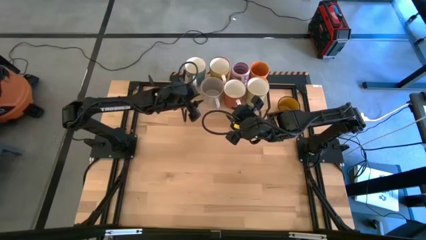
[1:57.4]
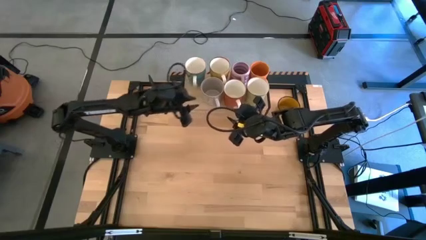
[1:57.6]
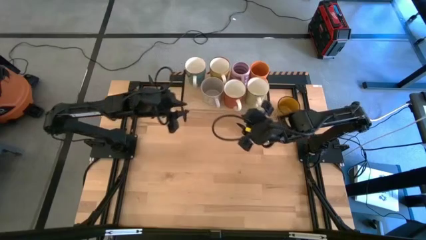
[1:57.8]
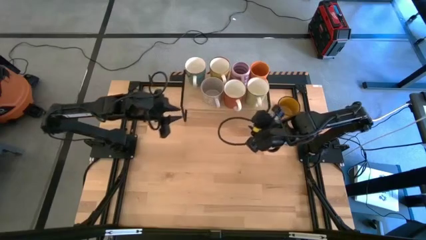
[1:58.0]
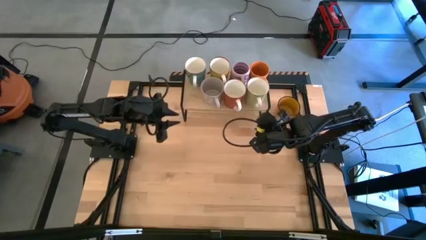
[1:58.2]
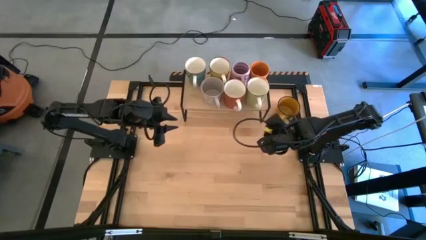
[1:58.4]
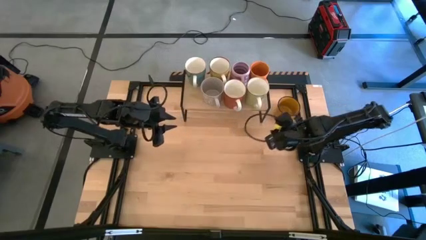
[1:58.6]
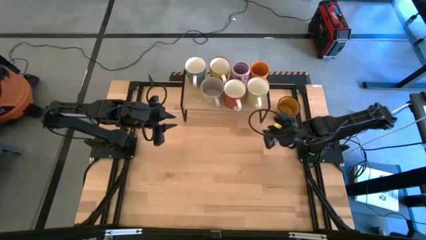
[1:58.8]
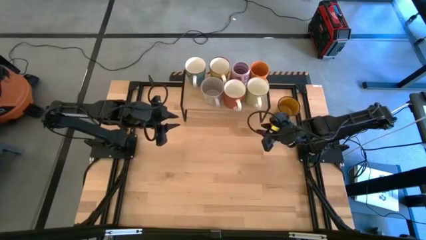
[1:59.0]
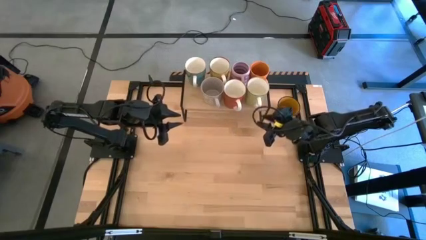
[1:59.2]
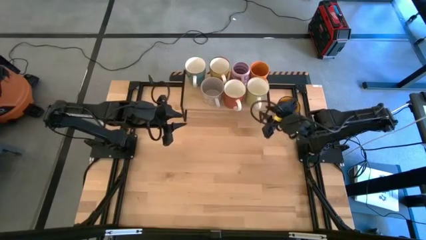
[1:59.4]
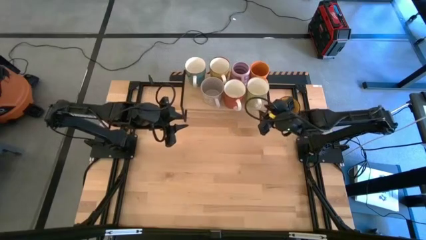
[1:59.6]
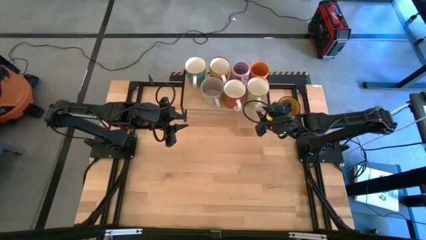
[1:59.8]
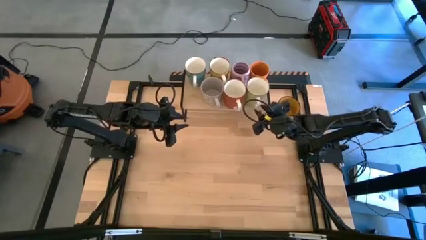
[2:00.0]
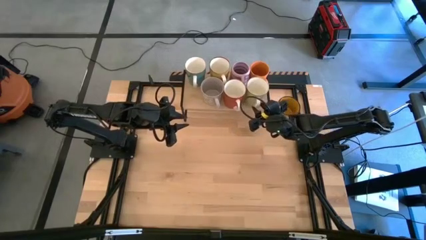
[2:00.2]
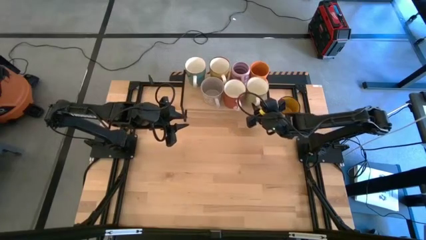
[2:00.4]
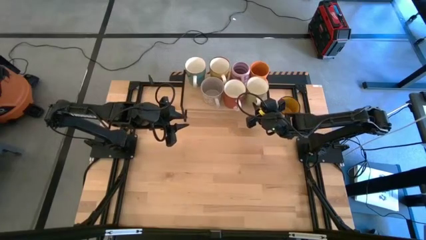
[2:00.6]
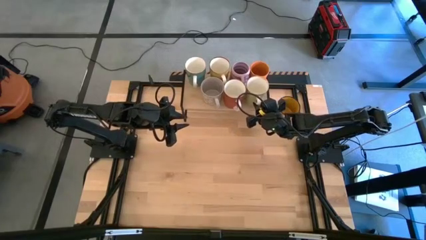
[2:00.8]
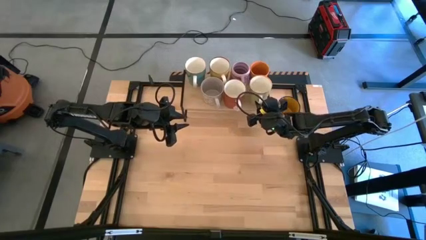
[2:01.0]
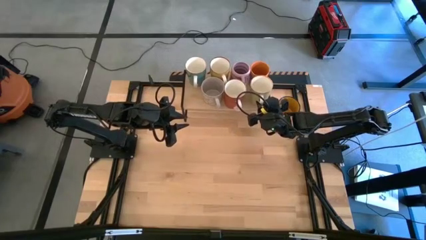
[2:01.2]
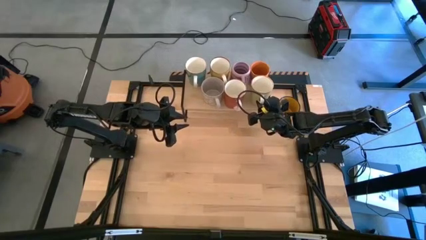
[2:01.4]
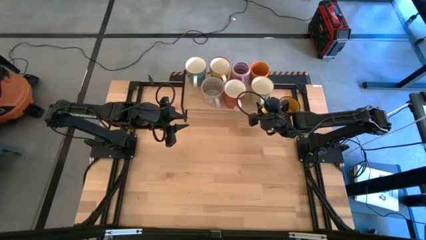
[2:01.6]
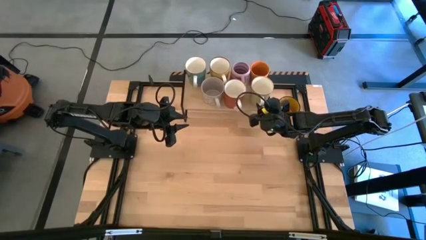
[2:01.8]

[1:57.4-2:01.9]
Task: Place coffee mugs
Adjust the green mug on the shelf

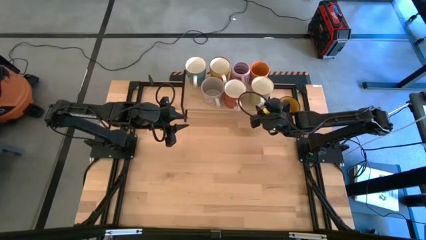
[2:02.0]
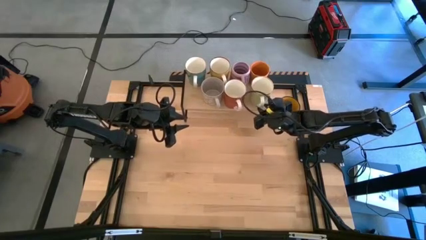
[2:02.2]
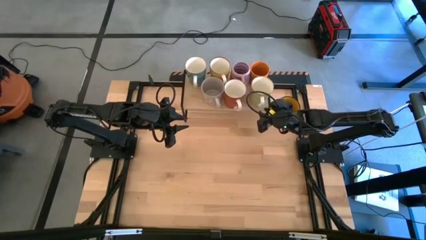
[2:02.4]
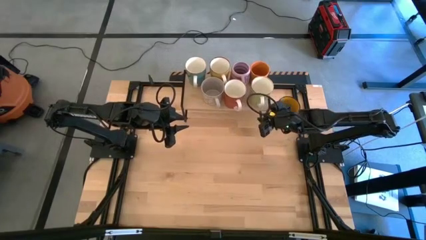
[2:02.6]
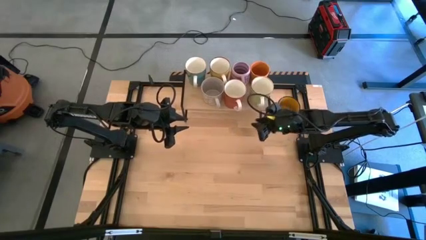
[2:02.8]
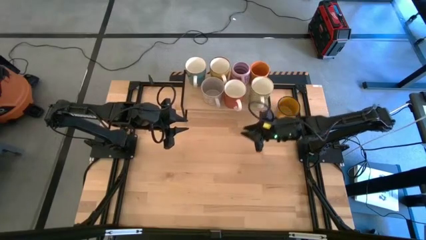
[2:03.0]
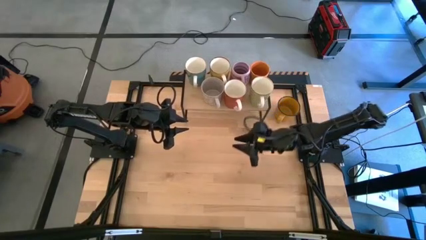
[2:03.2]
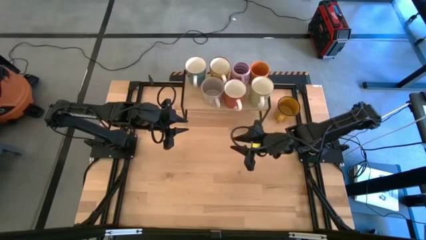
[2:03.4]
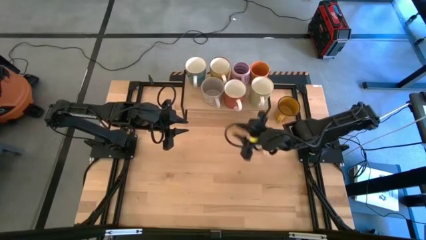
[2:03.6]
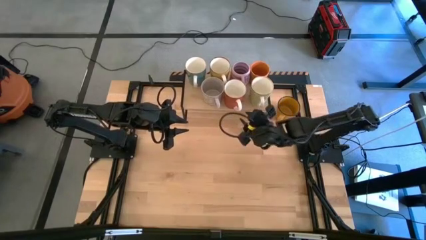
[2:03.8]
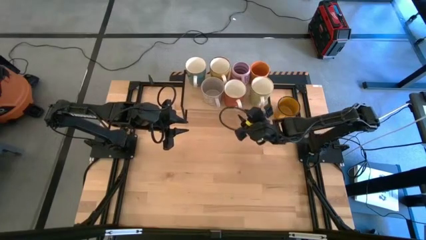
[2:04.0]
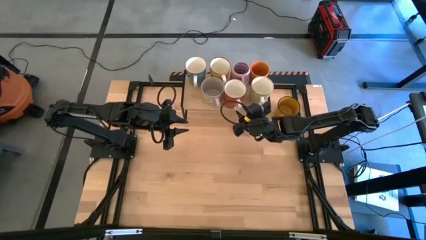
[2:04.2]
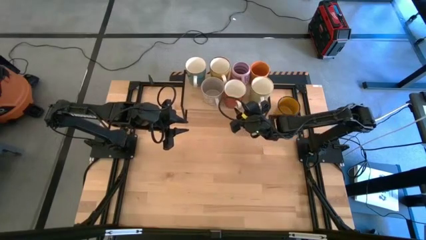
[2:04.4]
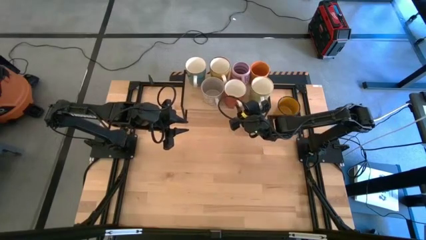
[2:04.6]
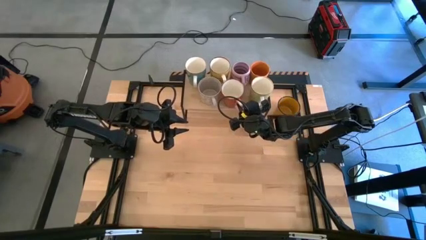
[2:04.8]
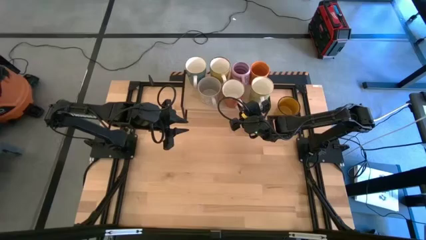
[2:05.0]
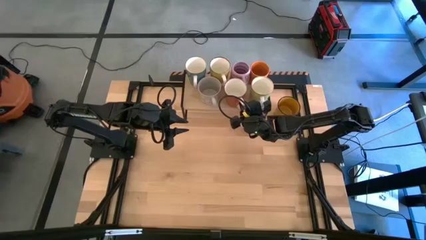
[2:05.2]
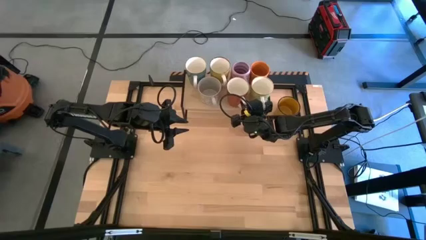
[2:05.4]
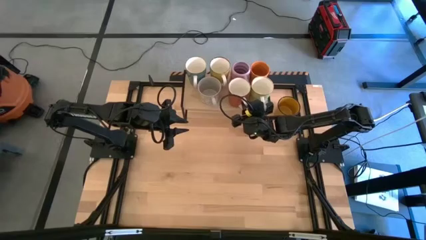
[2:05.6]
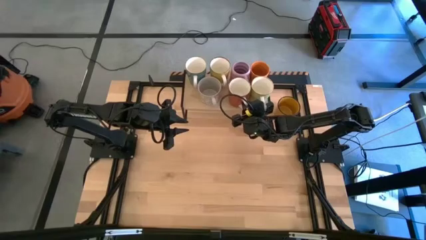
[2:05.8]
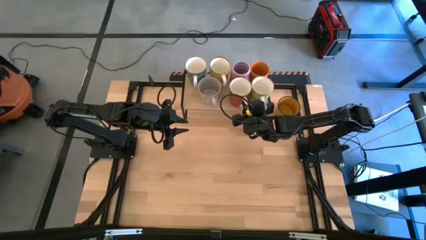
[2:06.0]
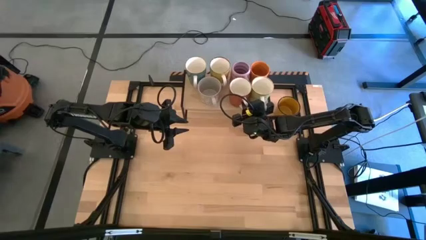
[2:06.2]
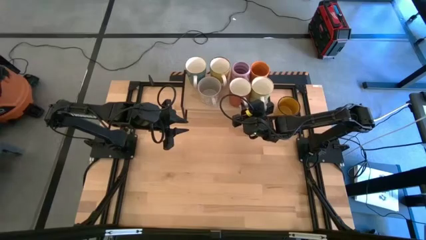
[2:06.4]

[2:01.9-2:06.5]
Adjust the red mug on the shelf

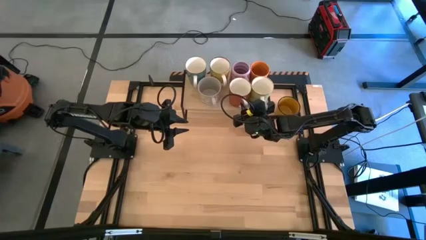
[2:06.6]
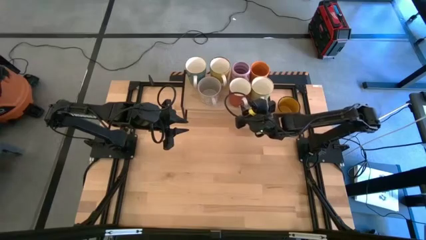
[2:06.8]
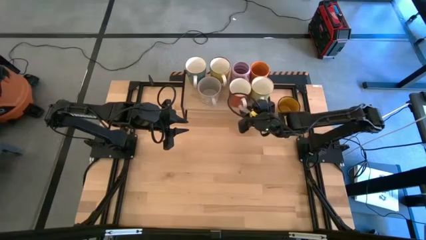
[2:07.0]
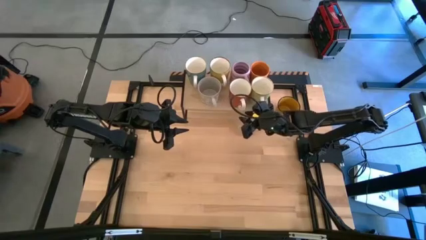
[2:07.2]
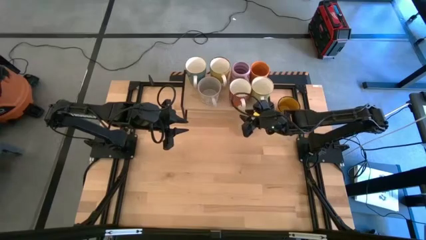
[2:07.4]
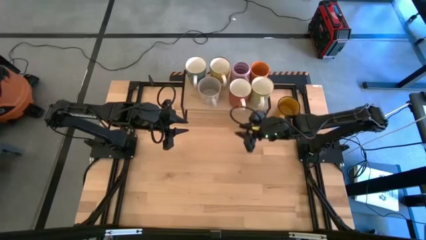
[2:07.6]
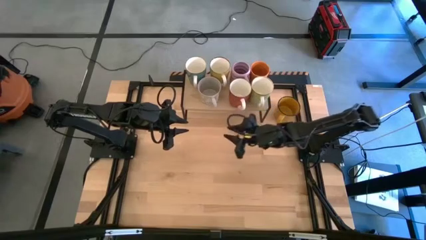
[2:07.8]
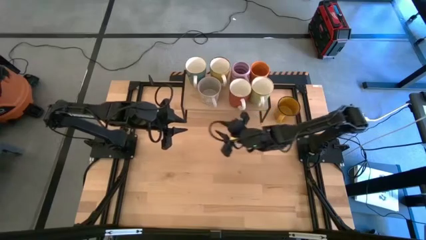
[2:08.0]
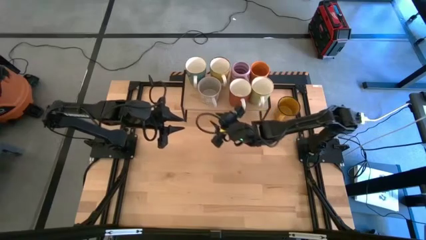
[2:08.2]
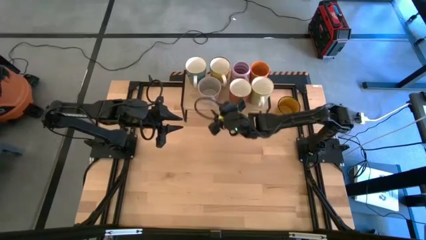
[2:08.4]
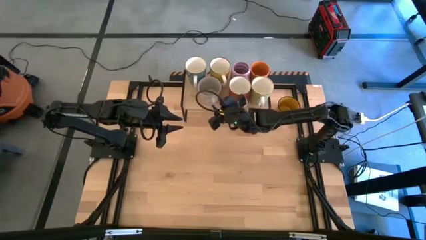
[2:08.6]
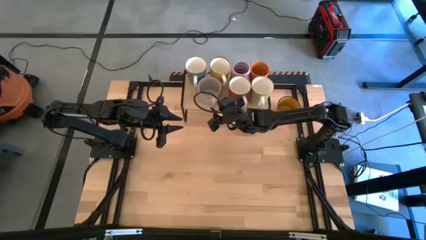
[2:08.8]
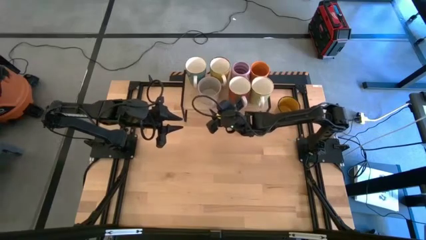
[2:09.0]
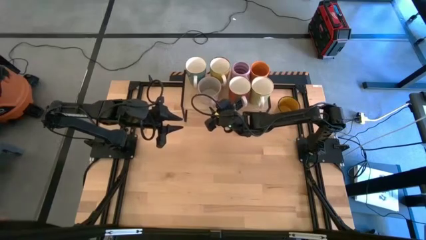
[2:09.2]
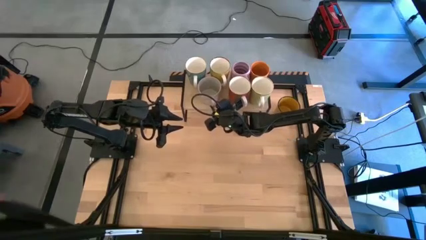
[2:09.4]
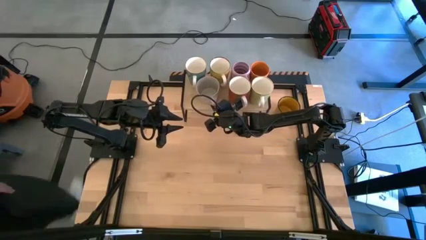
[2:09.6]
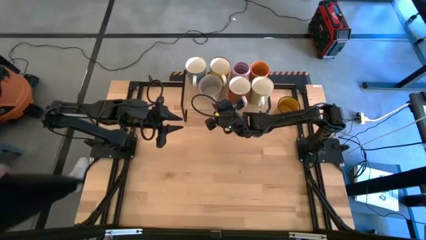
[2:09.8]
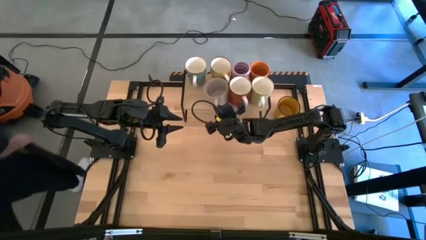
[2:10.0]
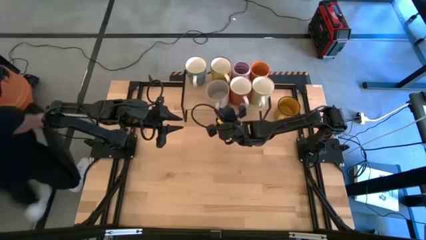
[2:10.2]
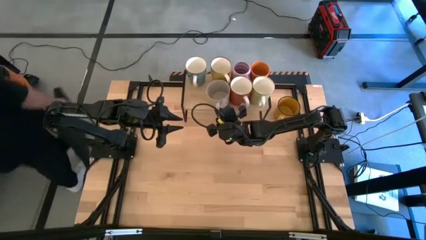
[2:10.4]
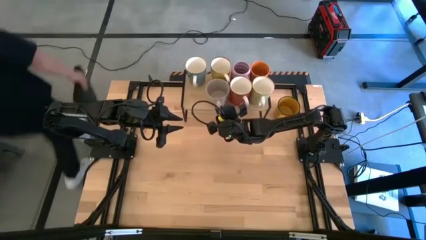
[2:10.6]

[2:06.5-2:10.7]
Adjust the gray mug on the shelf

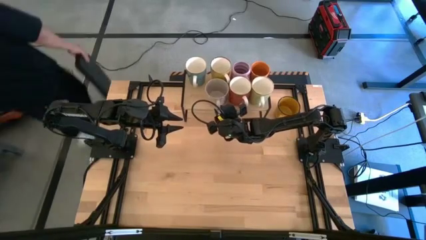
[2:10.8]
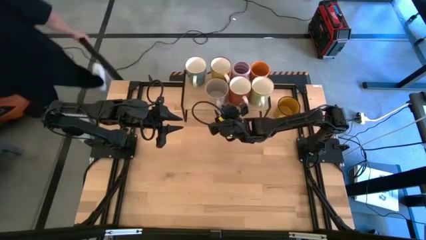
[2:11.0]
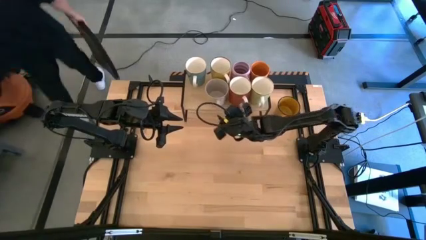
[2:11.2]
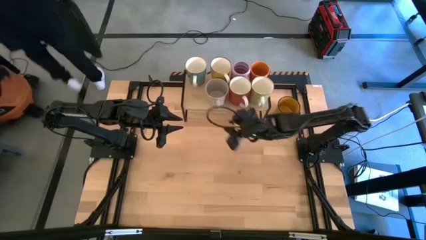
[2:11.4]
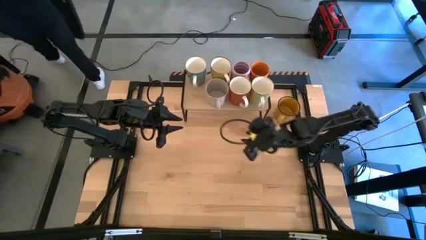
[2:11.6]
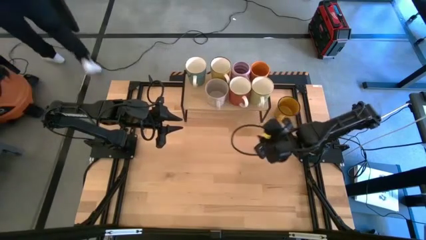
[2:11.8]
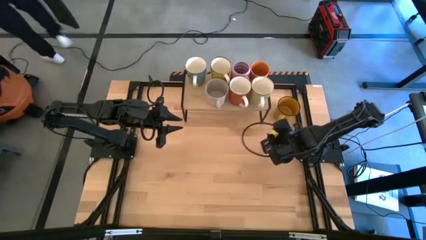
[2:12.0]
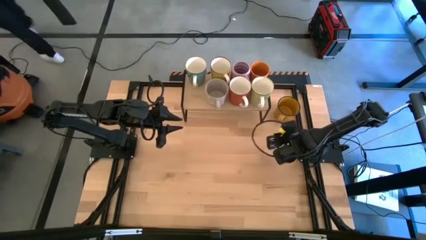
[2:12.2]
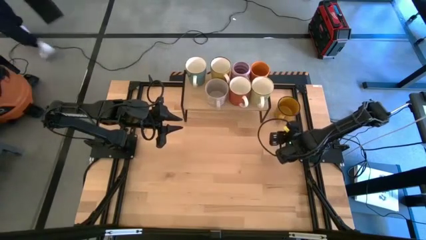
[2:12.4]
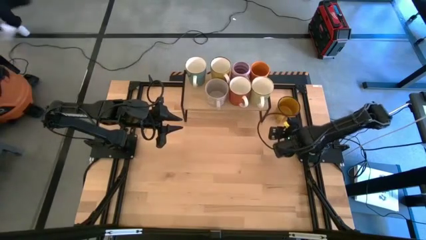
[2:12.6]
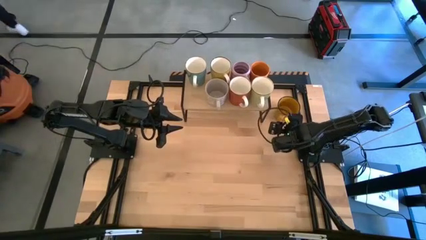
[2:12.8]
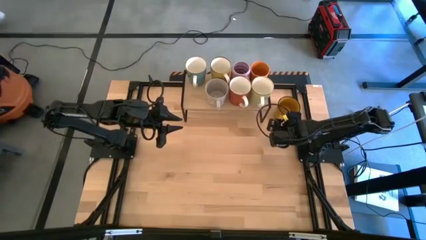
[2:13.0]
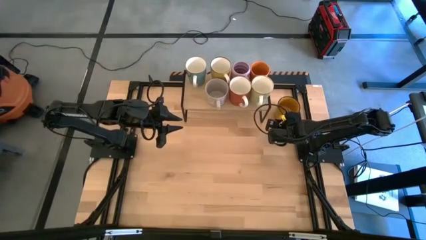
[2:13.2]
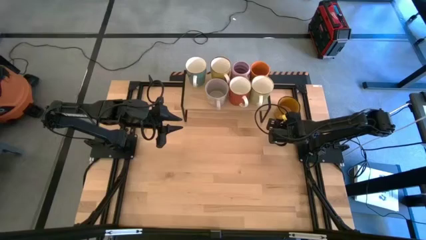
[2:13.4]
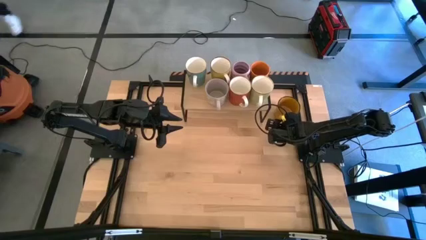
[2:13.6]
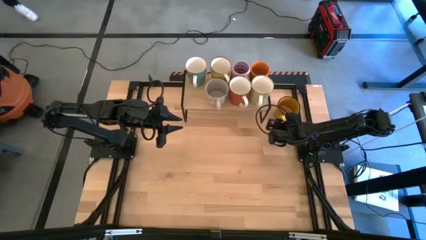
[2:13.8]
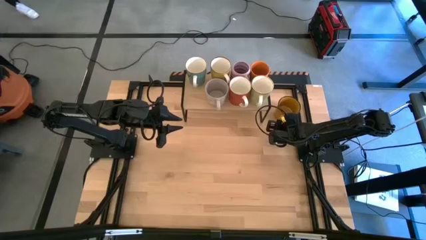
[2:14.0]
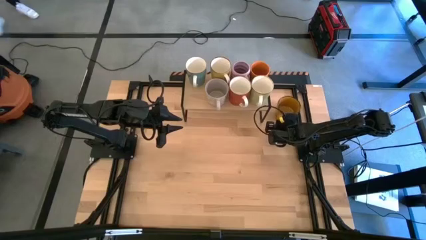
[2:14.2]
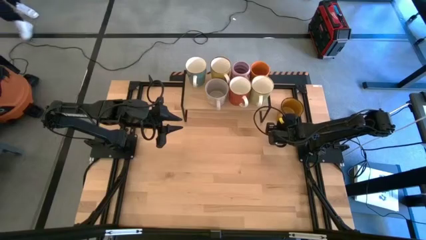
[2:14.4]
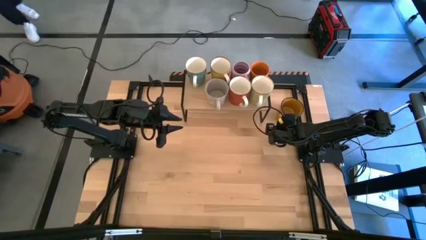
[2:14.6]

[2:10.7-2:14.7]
Put the yellow mug on the shelf
